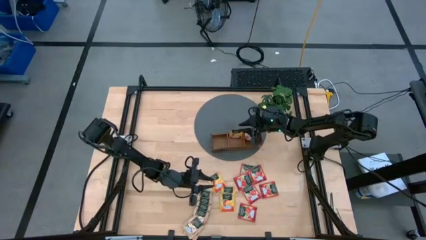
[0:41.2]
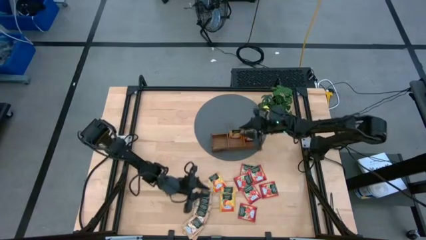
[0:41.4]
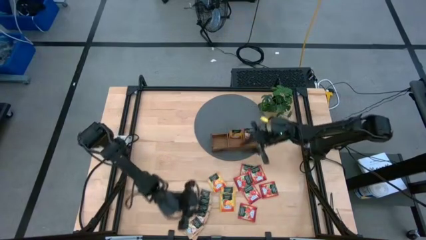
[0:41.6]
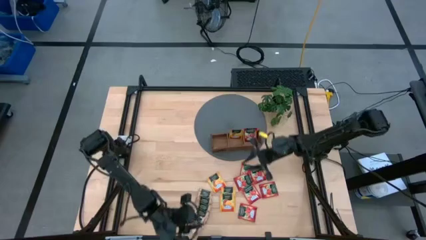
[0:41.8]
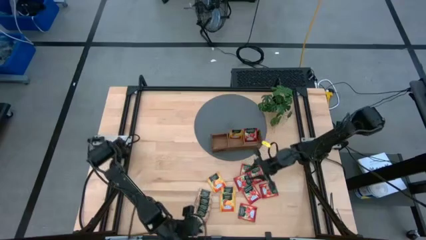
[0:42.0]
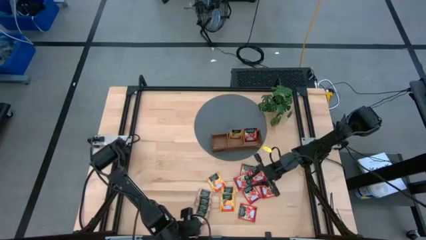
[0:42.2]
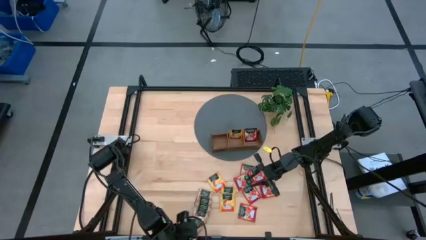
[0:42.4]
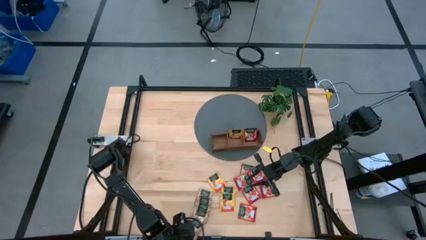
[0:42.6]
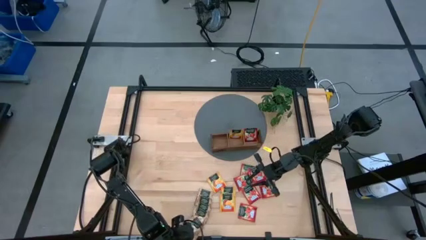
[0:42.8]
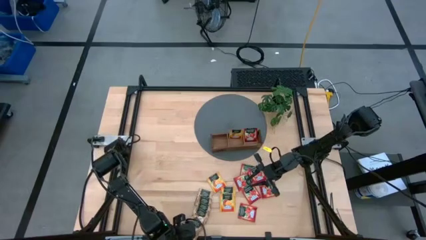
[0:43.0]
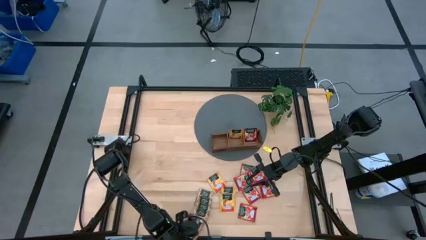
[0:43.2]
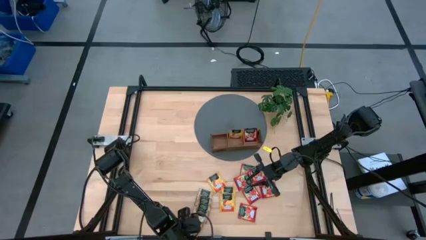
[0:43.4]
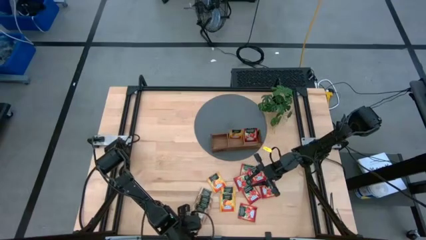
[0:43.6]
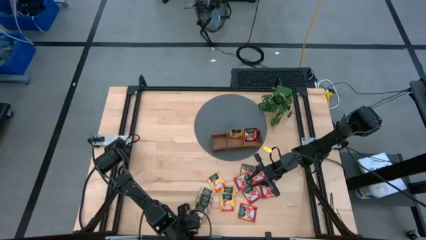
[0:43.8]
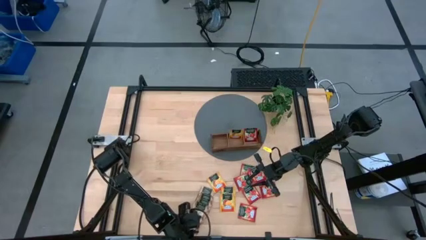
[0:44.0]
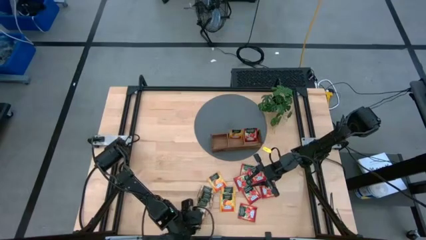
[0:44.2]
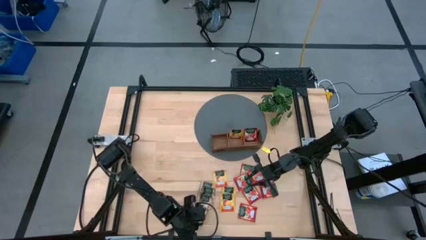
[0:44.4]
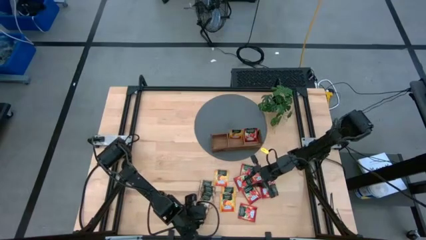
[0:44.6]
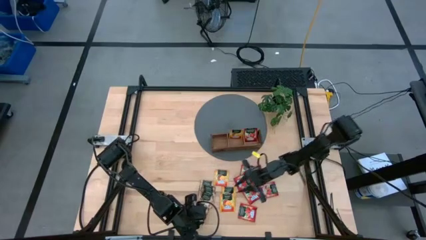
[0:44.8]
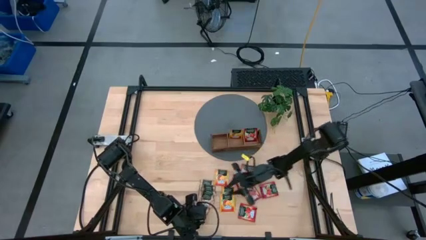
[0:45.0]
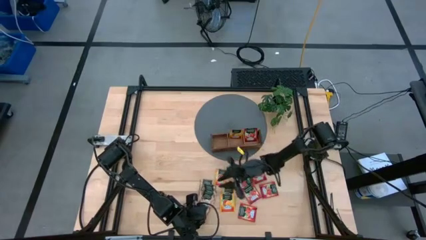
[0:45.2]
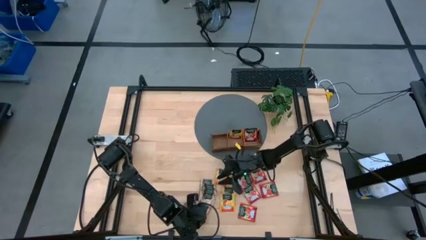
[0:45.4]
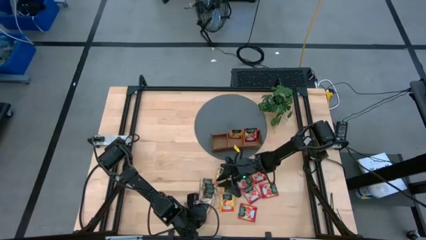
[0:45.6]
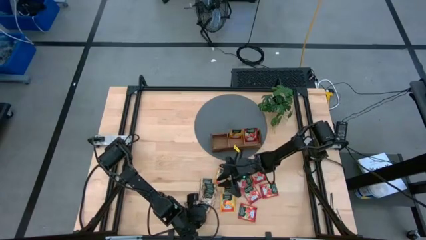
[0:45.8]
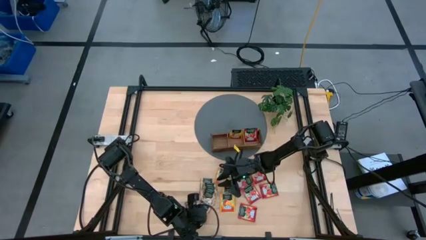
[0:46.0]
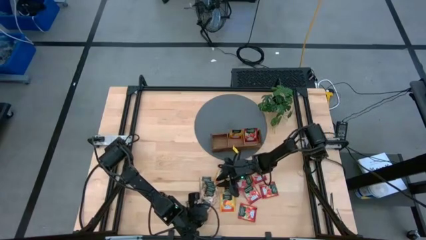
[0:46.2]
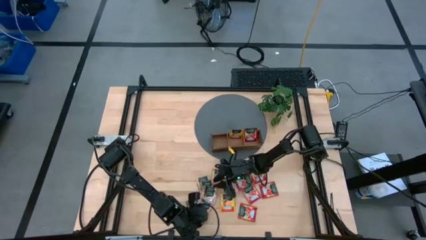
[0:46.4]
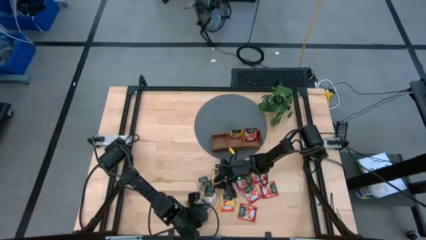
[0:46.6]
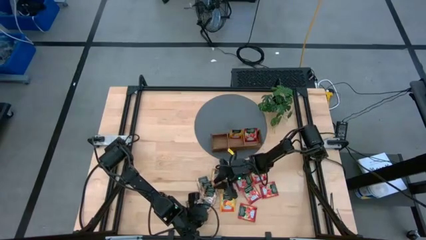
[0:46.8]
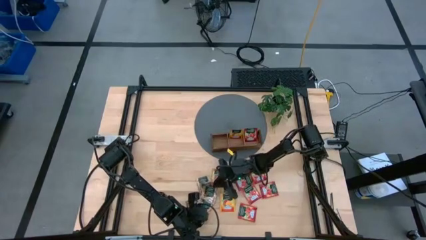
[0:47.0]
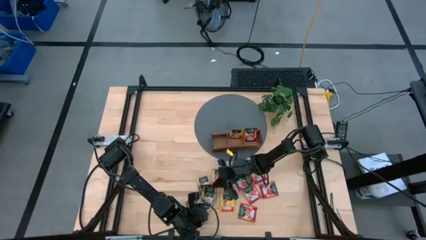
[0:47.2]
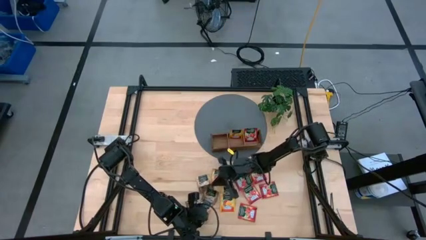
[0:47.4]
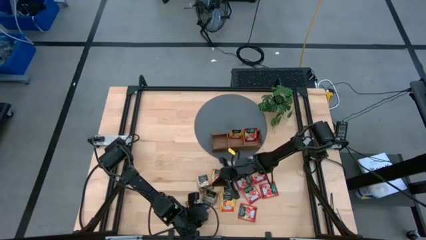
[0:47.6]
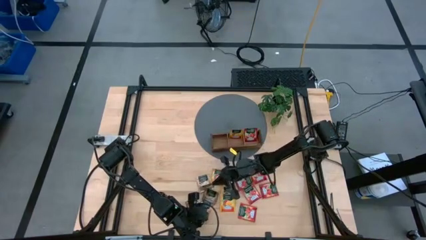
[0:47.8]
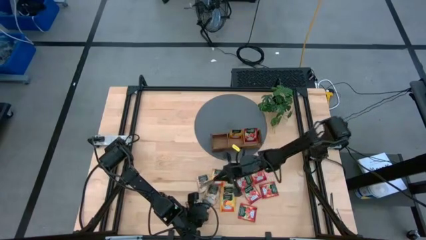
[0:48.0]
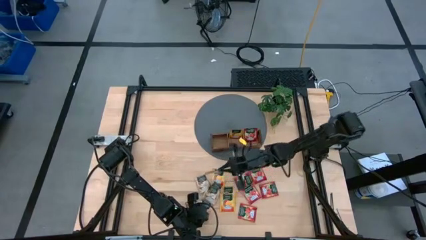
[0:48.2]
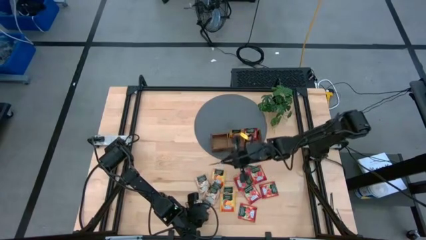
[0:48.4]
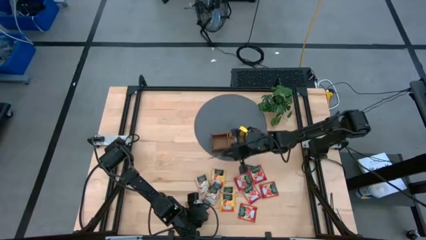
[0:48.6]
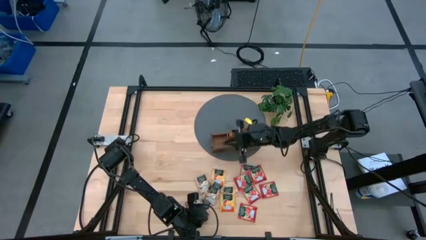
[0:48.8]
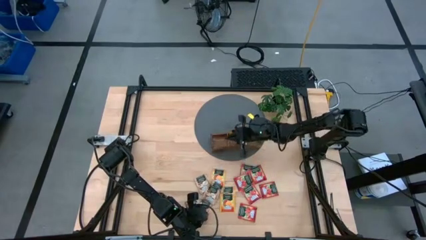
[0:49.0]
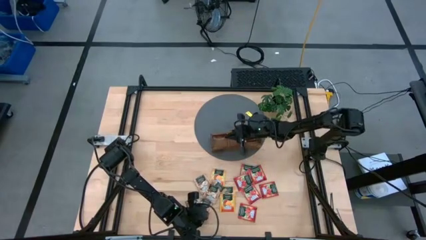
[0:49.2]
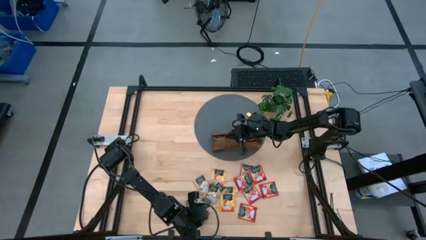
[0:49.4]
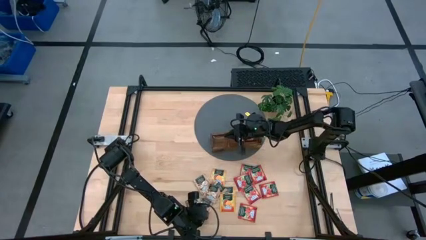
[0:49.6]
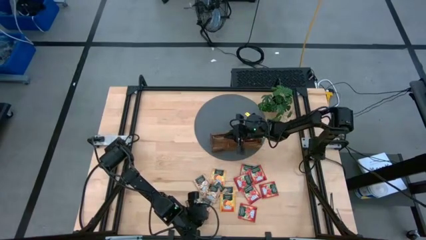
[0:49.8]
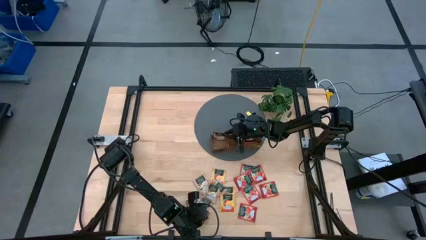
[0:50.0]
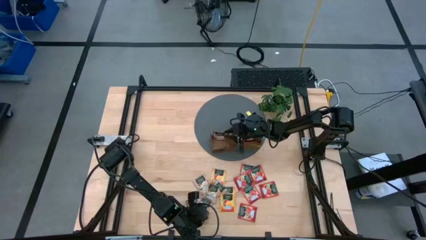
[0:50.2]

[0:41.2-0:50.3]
Task: Pick & Place Tea
Put the brown tea bag into the left section of the wooden organizer

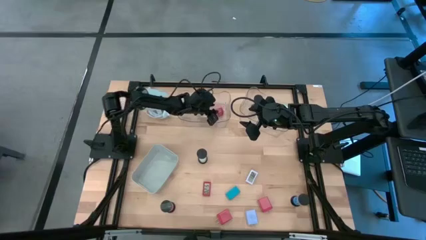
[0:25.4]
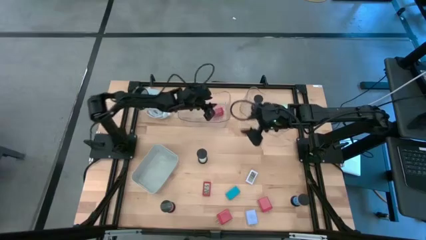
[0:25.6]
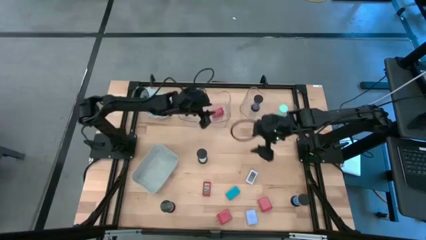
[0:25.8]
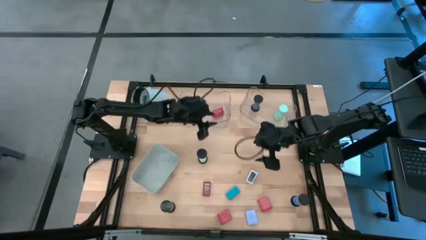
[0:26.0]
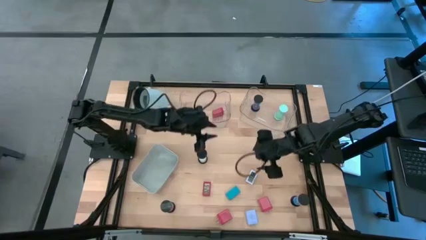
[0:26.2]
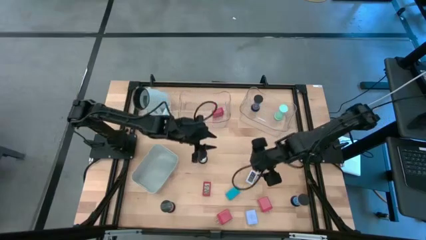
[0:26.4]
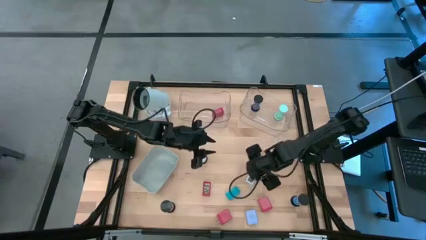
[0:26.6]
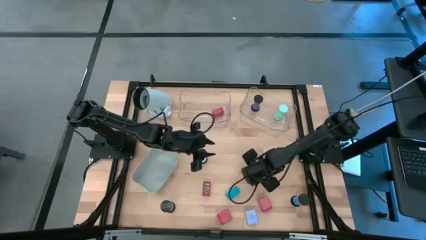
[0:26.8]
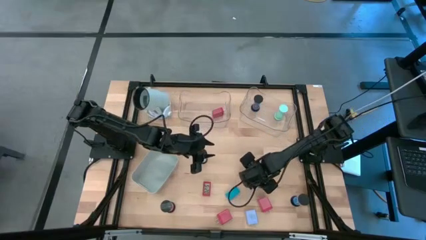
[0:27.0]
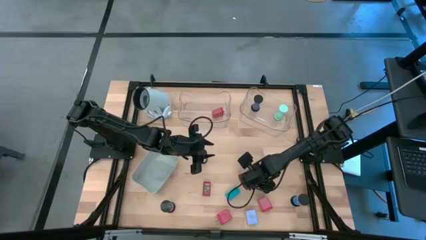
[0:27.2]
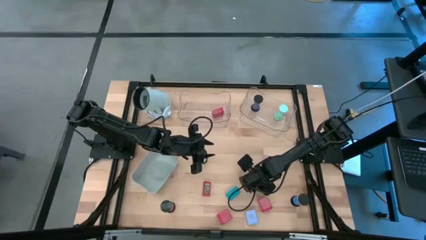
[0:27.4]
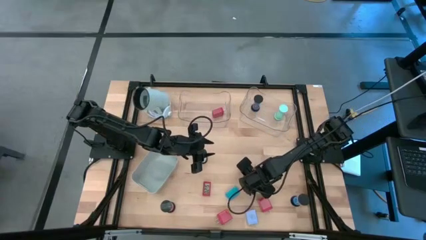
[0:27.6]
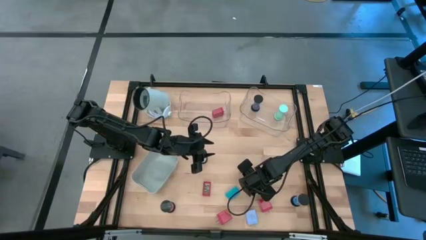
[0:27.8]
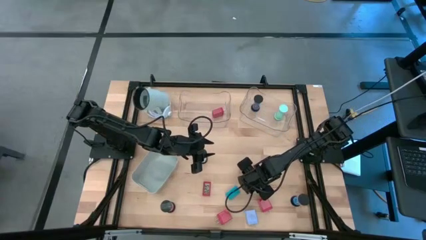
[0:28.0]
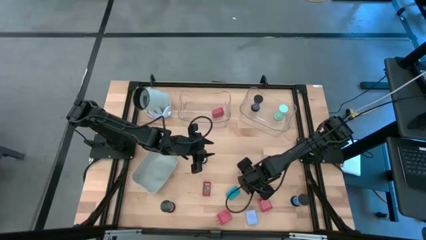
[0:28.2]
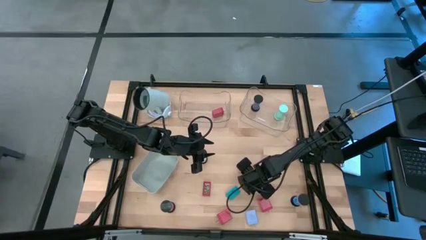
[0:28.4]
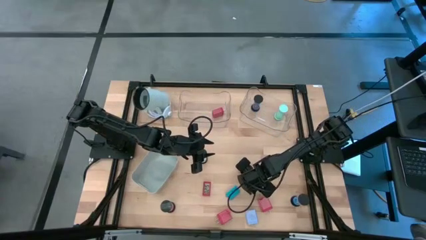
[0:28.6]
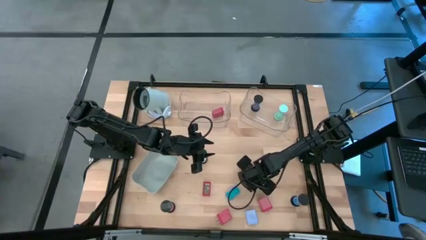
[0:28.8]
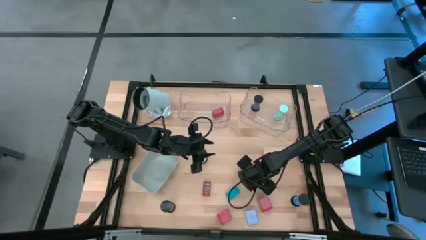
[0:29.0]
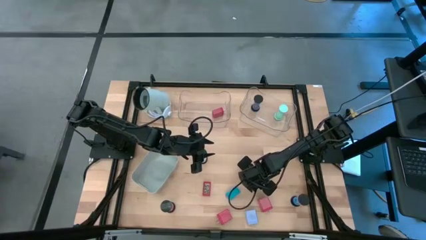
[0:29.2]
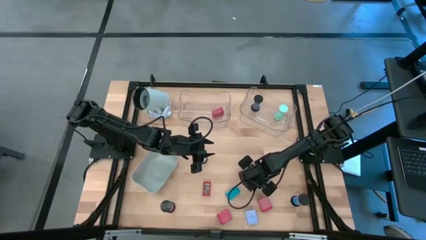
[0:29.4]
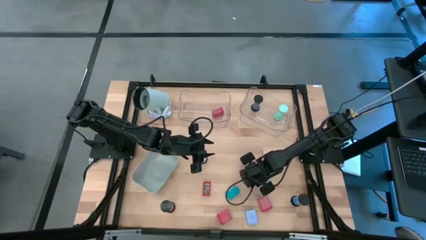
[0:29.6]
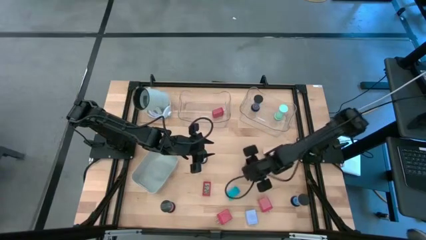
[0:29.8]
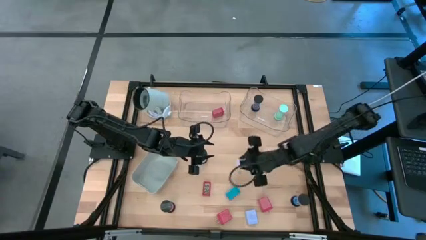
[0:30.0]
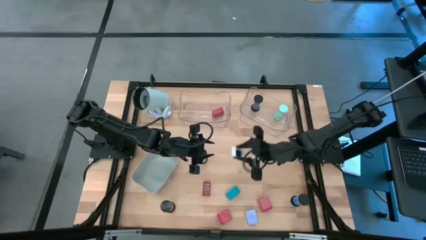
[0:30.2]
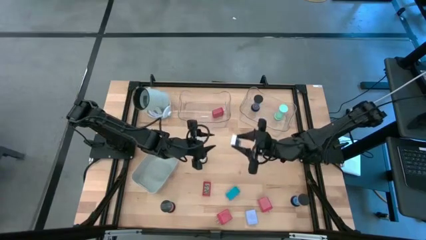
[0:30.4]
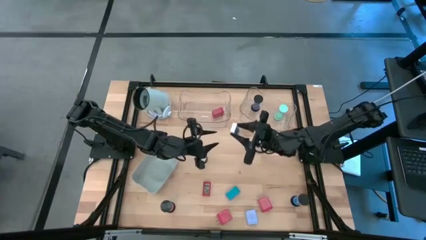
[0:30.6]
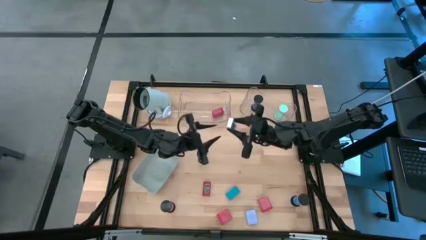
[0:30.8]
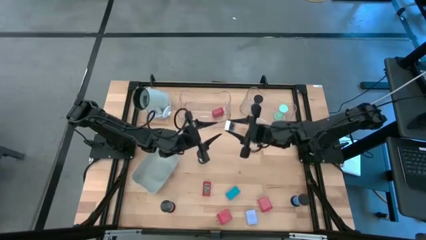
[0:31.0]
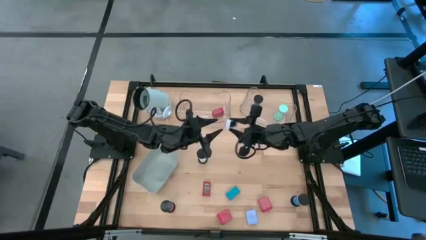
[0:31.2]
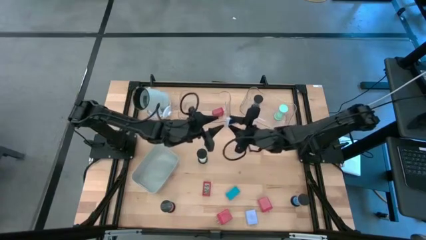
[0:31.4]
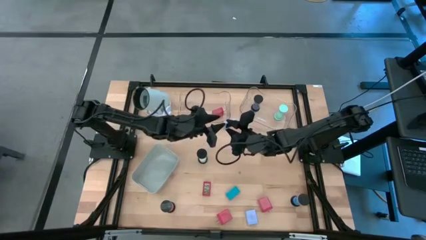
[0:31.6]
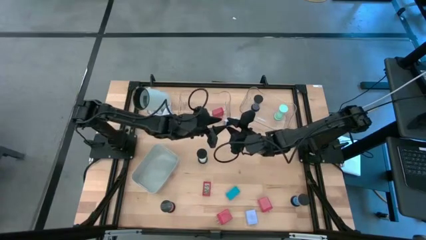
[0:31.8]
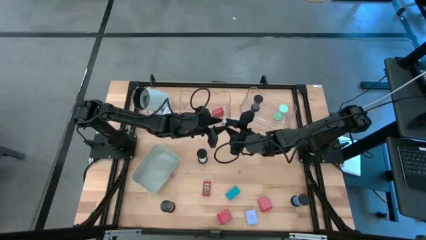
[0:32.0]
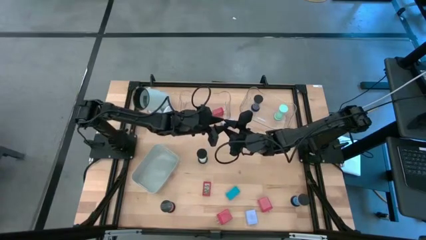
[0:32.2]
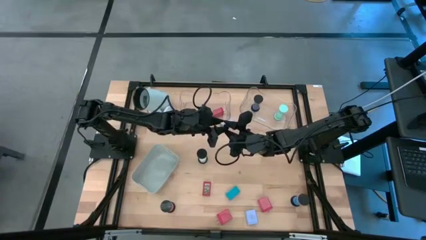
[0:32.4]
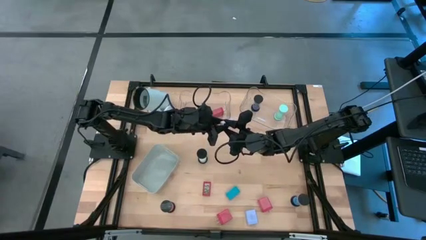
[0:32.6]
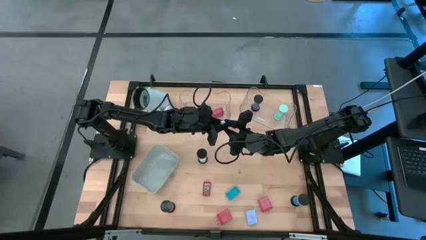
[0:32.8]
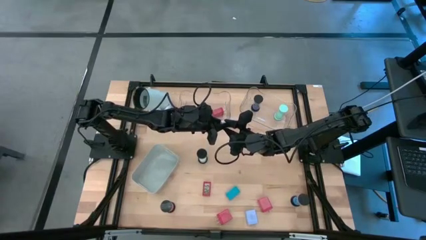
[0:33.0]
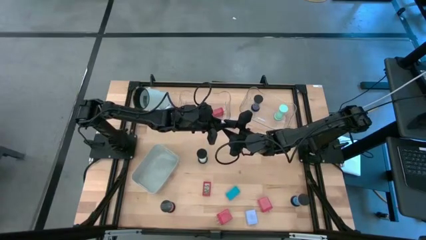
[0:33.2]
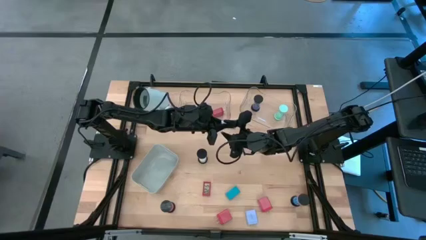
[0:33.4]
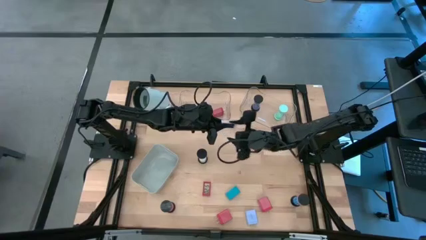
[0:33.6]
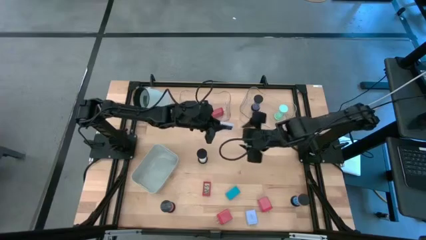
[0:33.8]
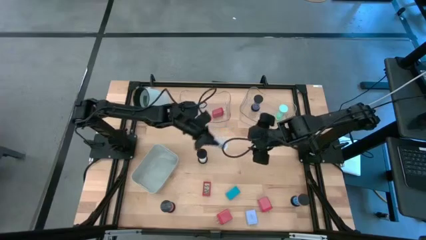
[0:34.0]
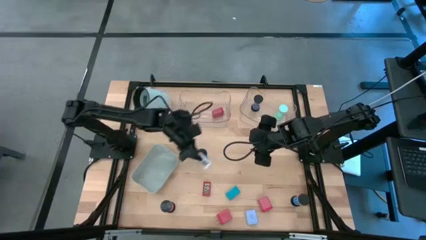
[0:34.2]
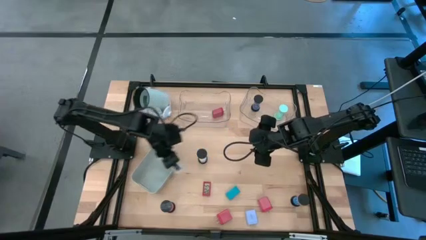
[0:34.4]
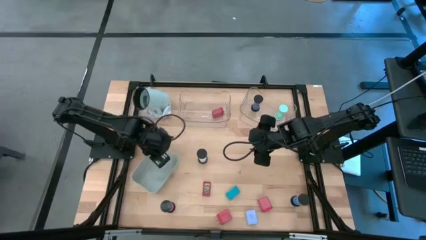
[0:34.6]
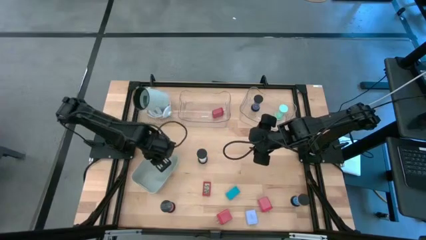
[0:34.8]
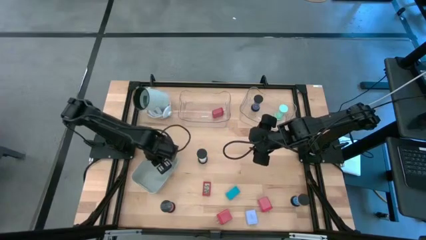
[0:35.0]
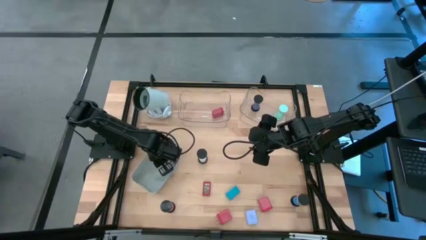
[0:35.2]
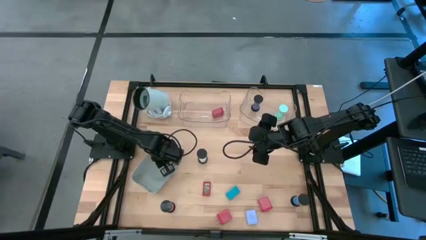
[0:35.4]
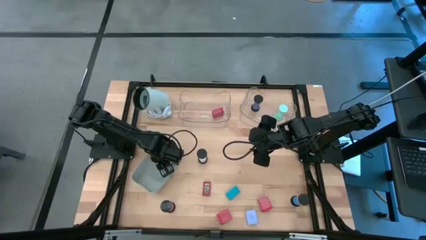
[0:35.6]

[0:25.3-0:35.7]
Task: Pick & Place Office items
Put the white digital clock into the gray bin
